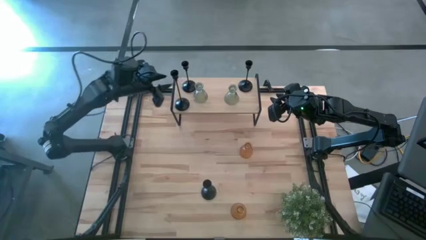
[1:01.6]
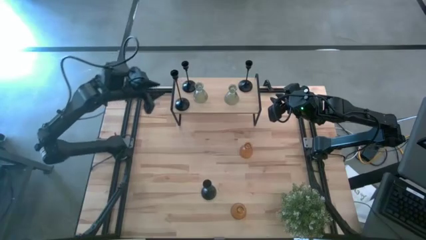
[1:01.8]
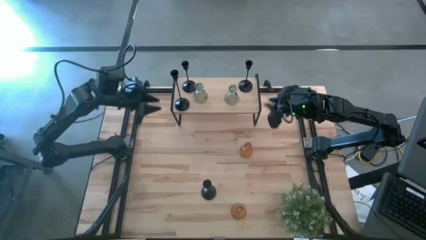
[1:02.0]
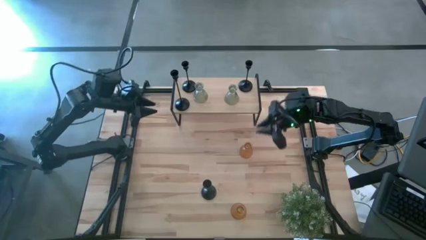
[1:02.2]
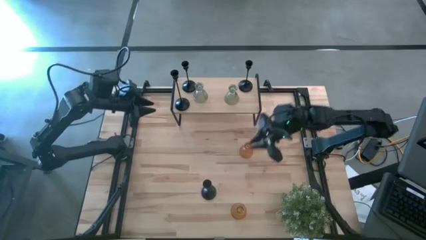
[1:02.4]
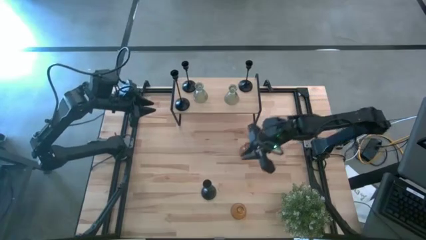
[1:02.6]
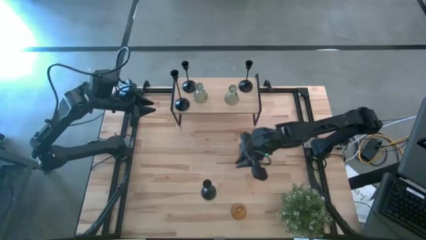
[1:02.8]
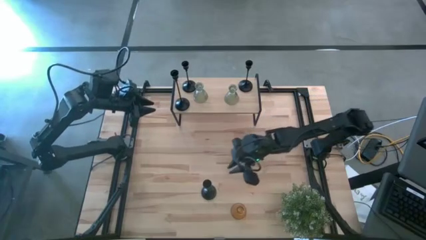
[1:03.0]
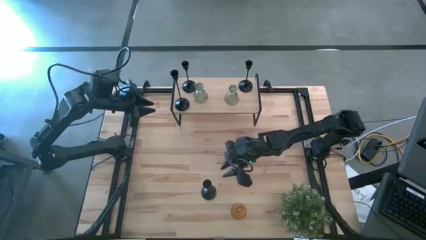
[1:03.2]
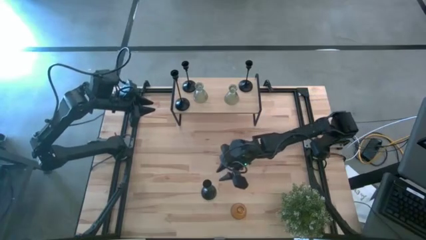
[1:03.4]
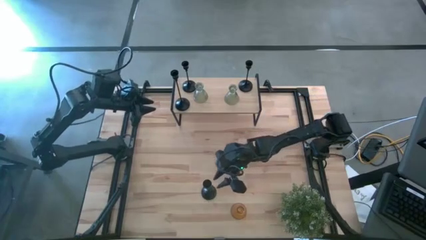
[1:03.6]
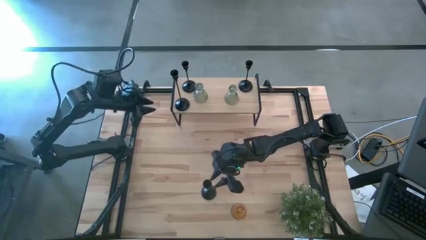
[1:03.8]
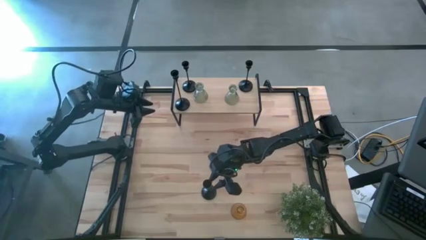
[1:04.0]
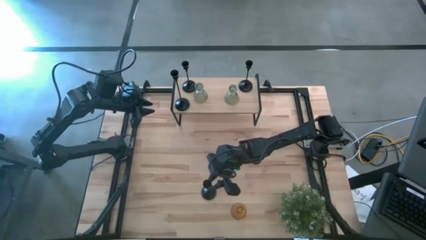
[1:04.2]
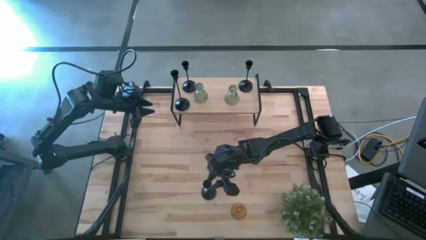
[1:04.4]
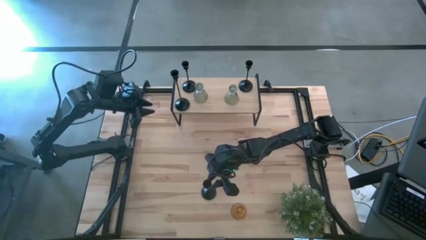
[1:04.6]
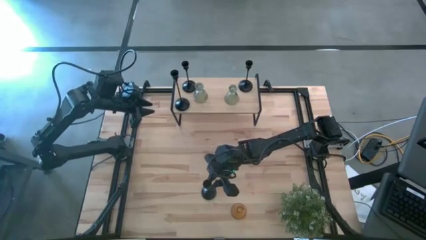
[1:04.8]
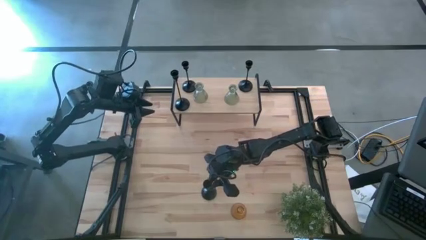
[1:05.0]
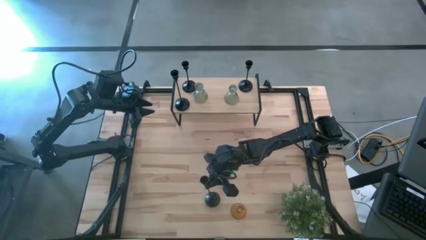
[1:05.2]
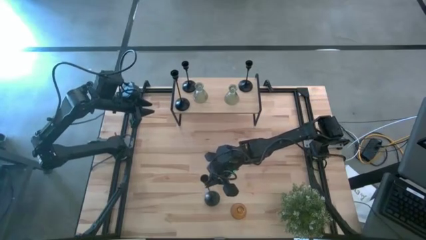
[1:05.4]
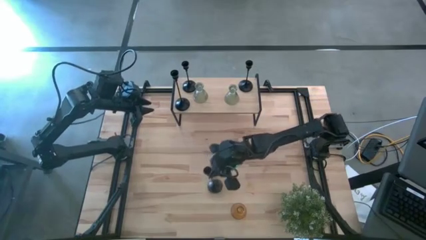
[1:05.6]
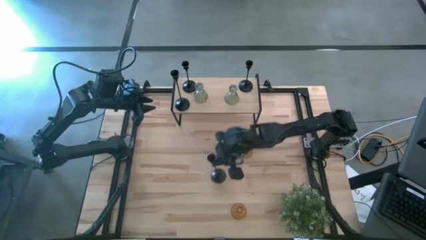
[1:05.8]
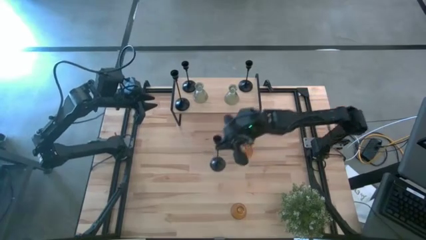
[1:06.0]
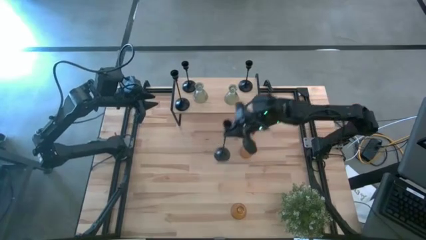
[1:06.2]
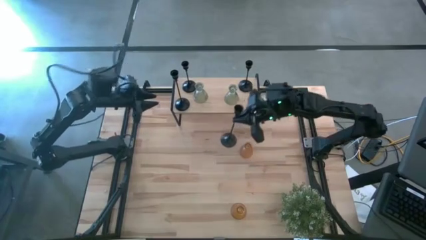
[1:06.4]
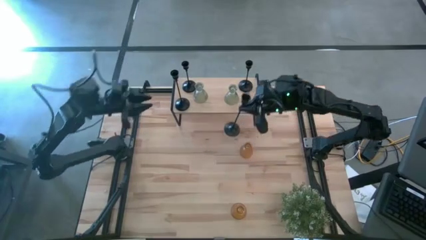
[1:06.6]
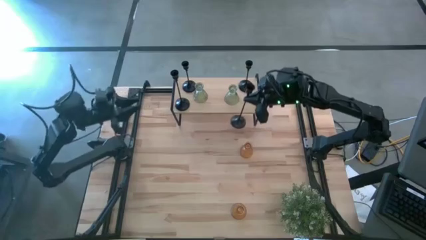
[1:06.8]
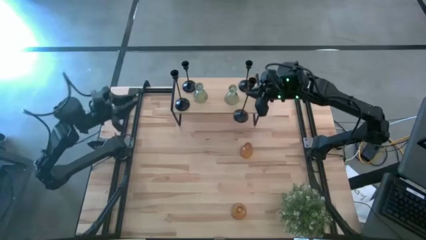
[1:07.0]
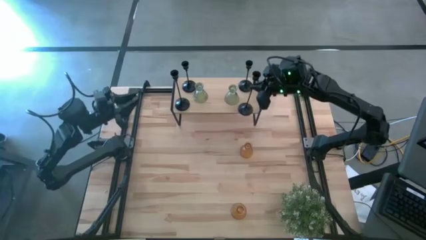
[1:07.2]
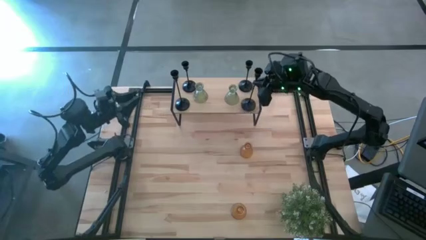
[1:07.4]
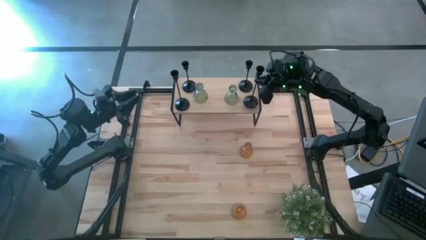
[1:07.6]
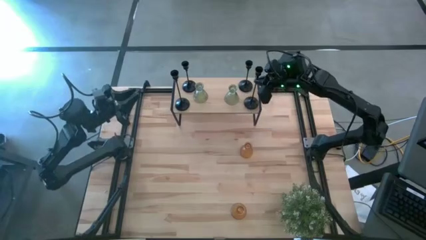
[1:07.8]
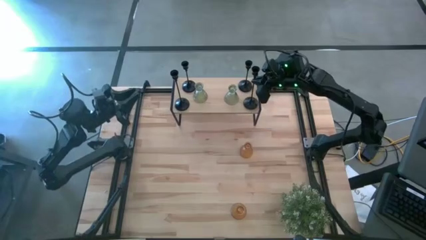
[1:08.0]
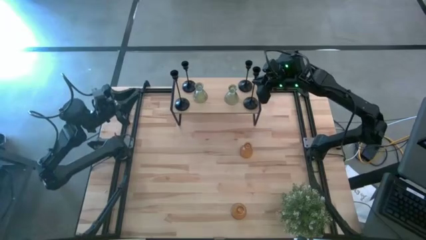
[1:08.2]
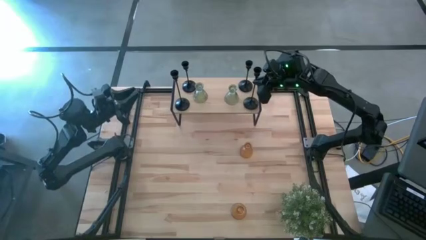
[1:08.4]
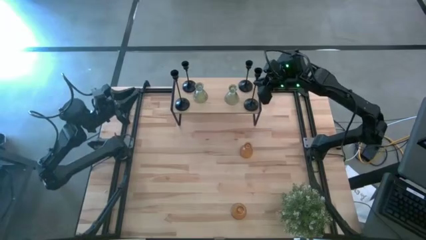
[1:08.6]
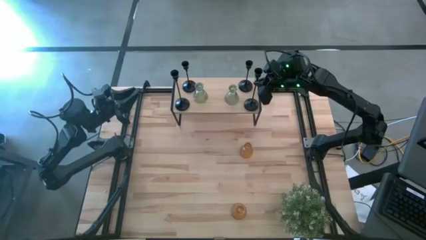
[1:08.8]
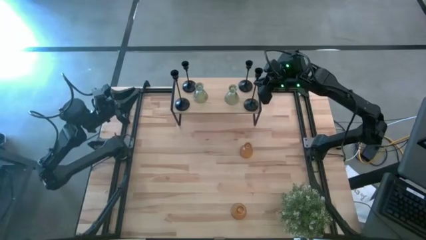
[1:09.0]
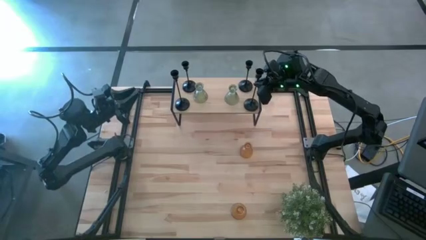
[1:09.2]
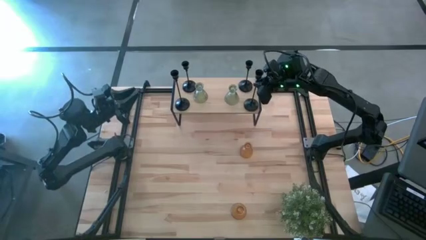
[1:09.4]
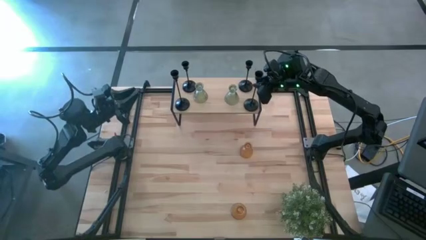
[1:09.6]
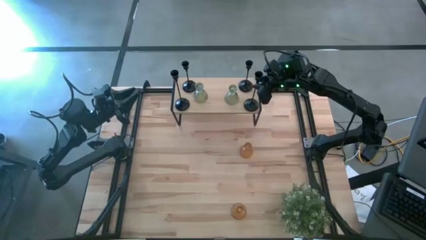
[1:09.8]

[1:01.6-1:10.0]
Task: Pick & Place candle stick holders
Put the black candle holder on the shelf

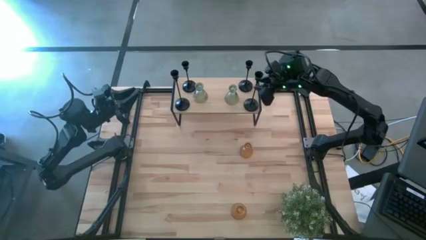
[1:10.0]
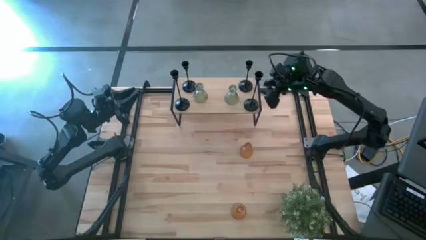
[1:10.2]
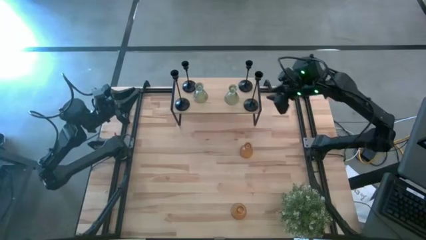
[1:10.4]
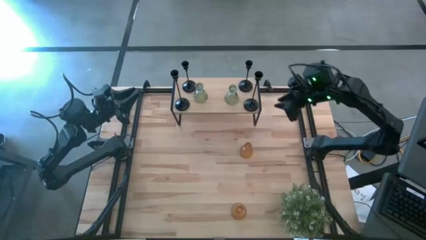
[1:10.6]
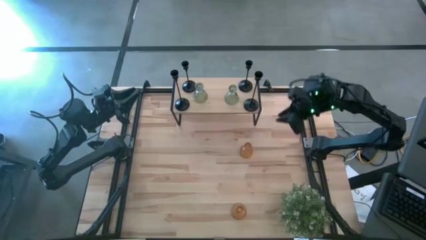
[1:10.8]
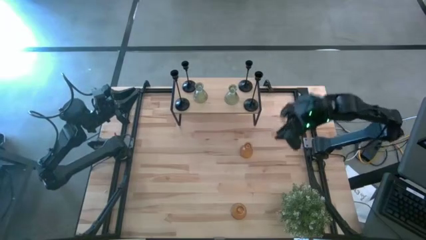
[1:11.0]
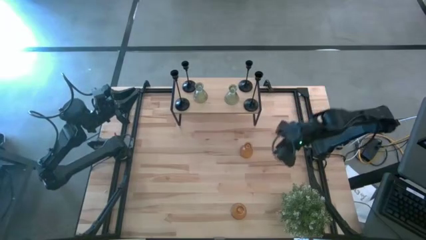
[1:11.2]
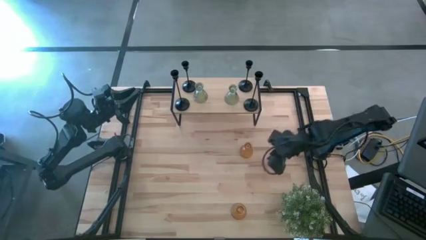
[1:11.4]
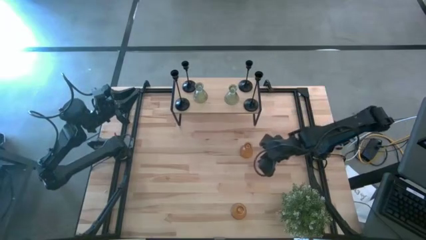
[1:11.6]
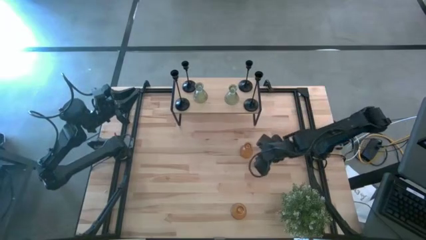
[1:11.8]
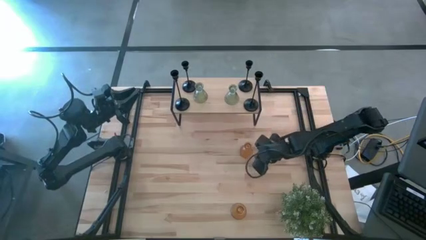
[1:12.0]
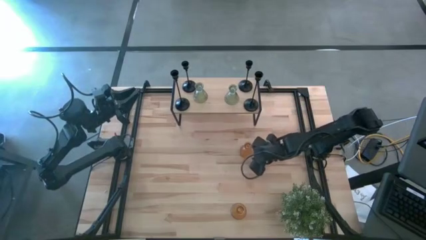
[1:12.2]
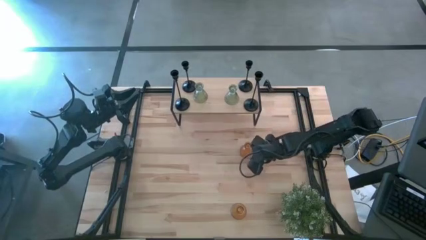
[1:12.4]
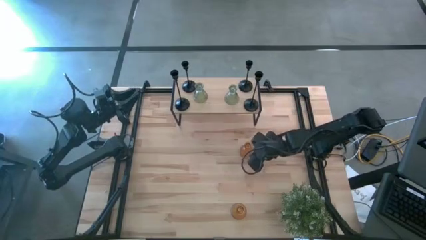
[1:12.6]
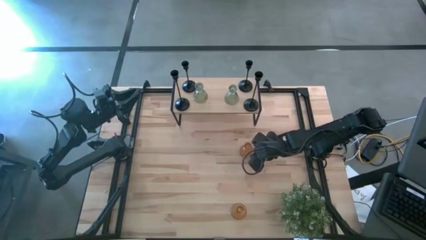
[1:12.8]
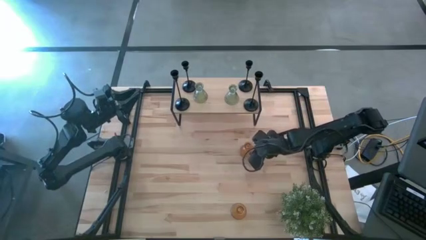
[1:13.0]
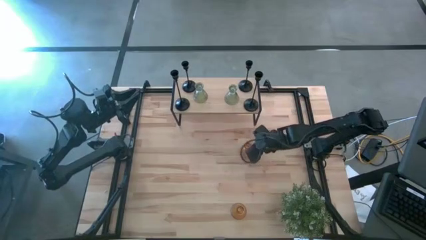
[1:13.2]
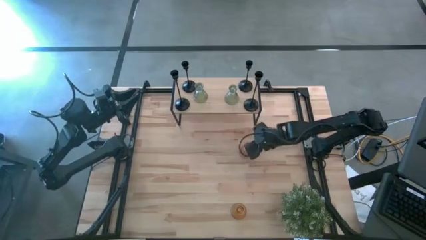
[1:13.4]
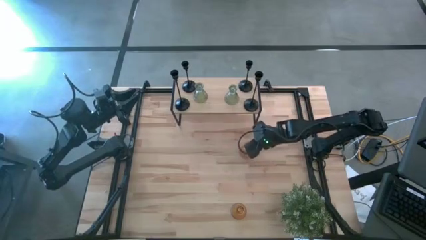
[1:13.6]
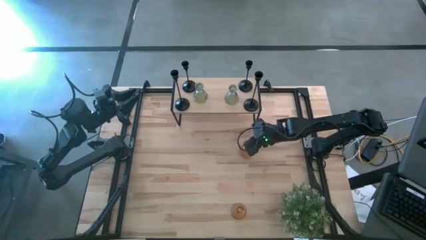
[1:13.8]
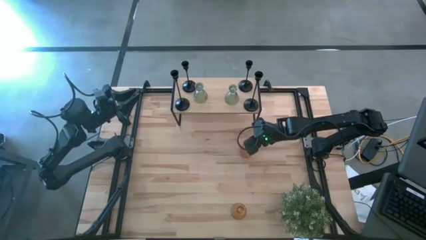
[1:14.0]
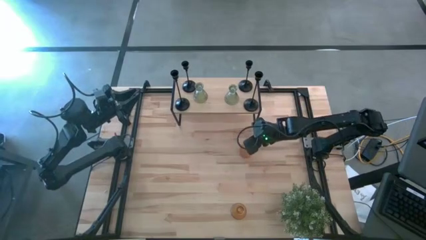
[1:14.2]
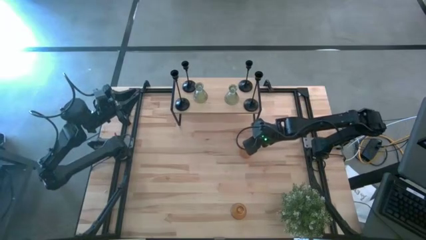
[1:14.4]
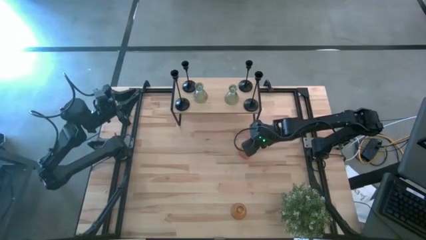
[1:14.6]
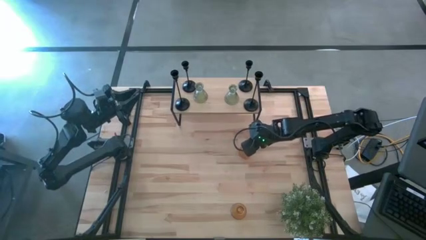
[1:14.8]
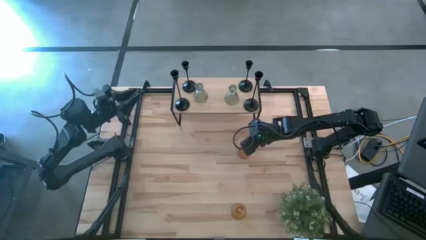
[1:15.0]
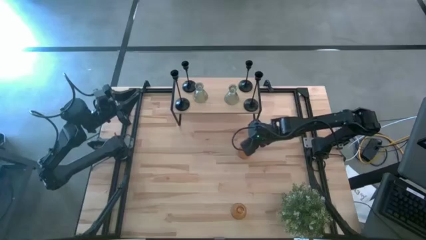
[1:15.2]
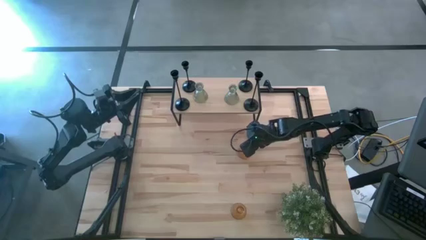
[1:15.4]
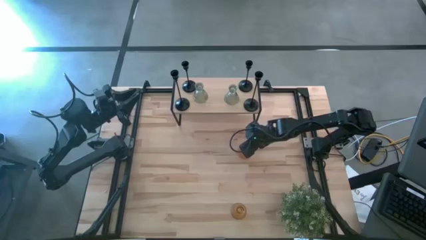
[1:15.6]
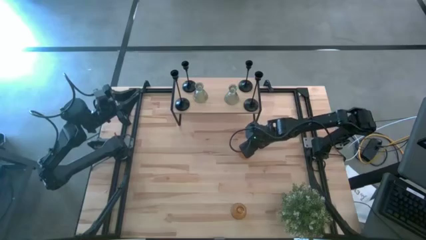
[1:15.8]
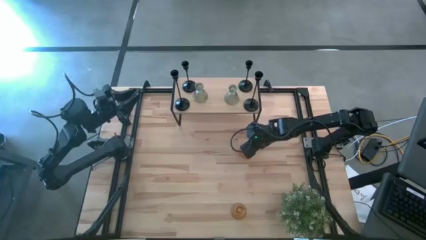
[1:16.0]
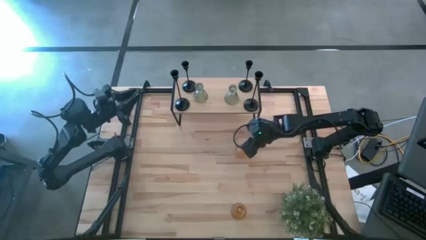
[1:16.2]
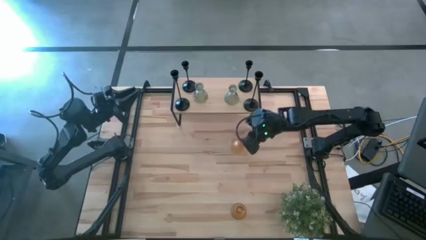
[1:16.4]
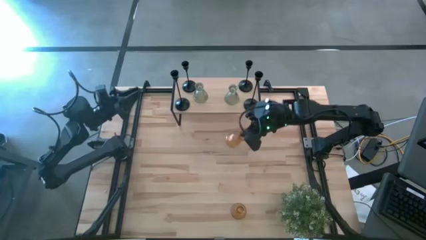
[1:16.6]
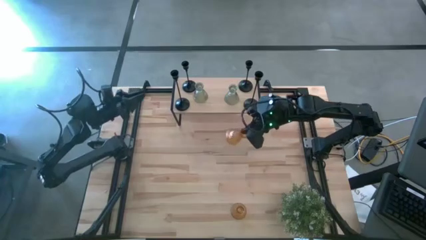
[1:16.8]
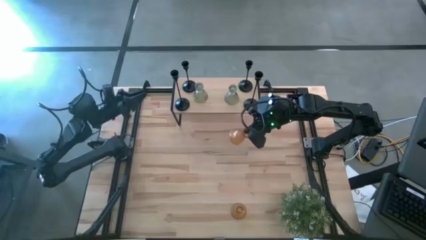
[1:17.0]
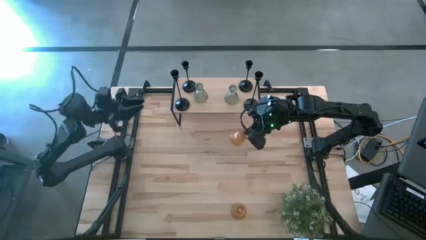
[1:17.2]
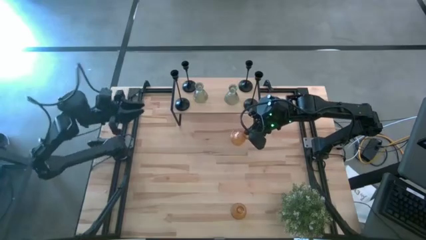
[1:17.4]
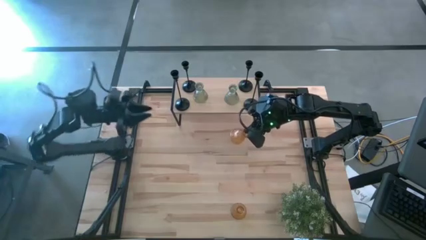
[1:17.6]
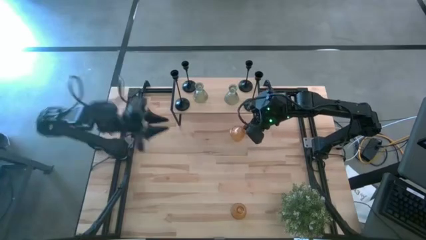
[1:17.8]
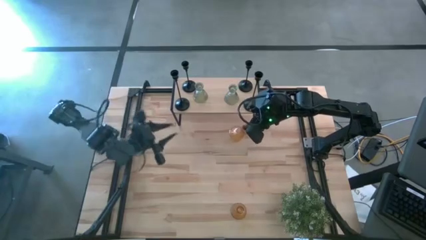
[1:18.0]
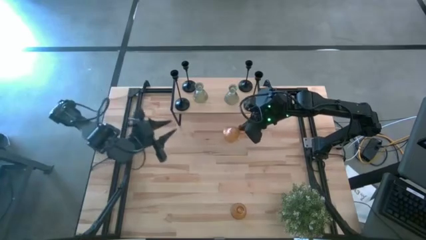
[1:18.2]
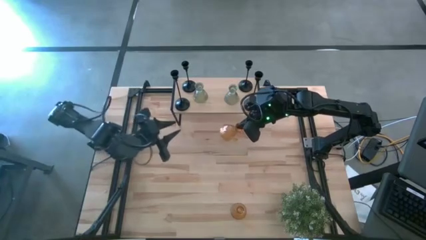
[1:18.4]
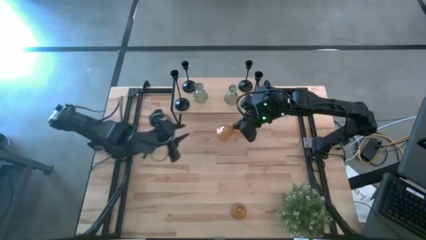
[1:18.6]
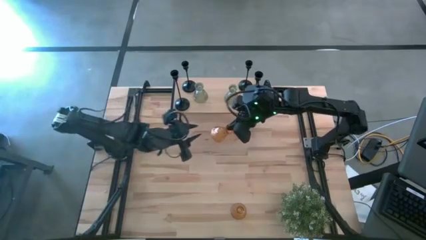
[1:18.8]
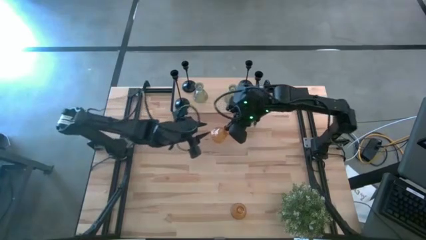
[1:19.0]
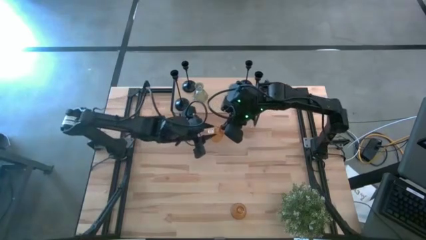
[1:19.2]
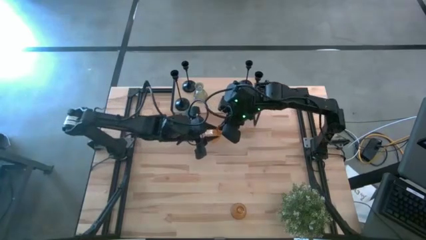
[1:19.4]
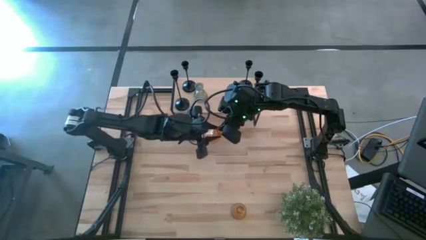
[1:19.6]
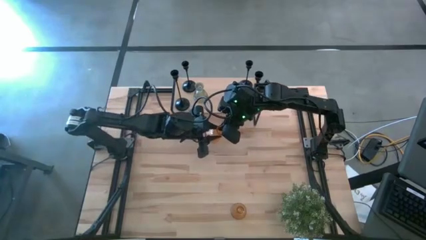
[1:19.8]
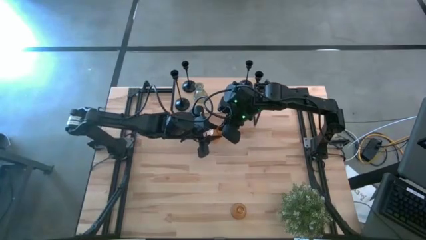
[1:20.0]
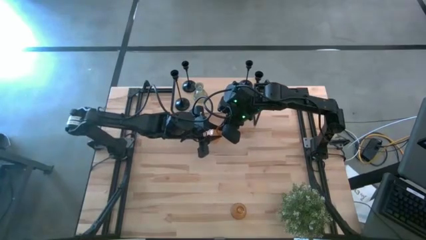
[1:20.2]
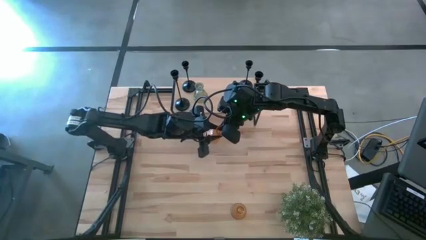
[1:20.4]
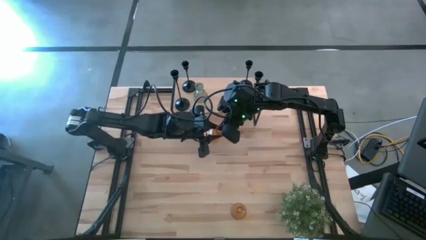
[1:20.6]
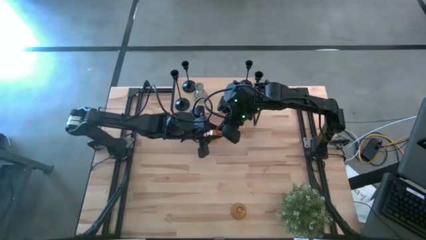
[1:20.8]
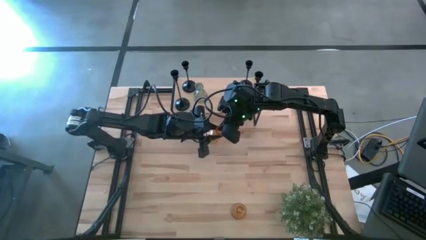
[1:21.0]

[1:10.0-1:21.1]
Put the orange glass candle holder on the shelf
